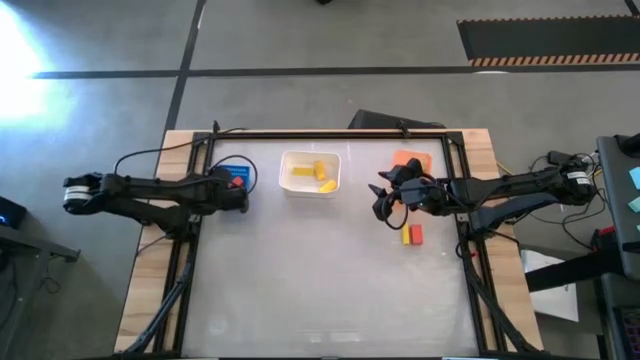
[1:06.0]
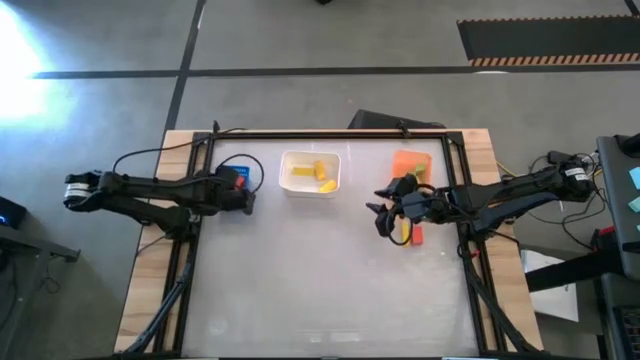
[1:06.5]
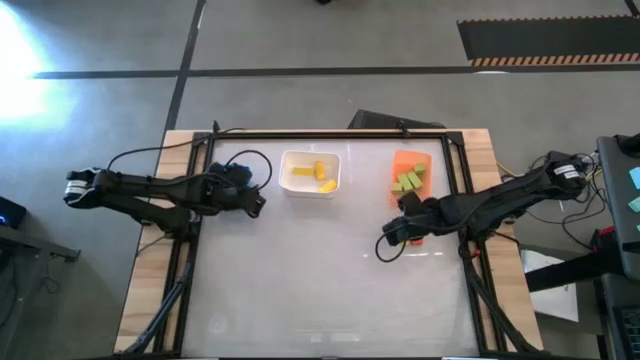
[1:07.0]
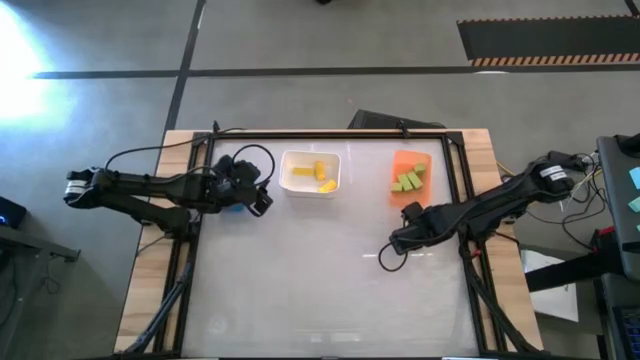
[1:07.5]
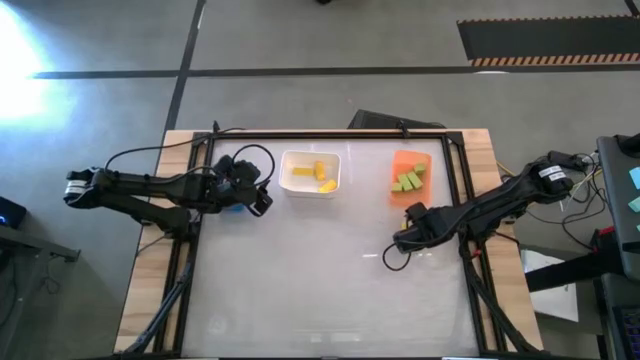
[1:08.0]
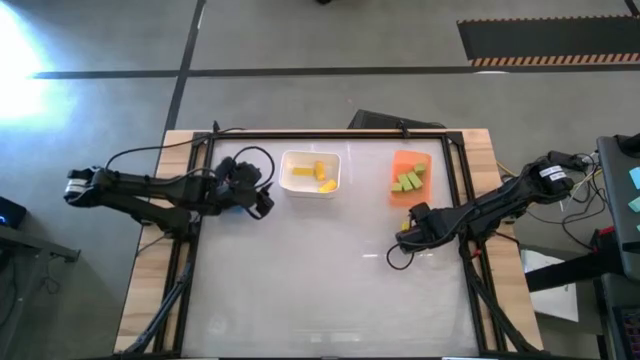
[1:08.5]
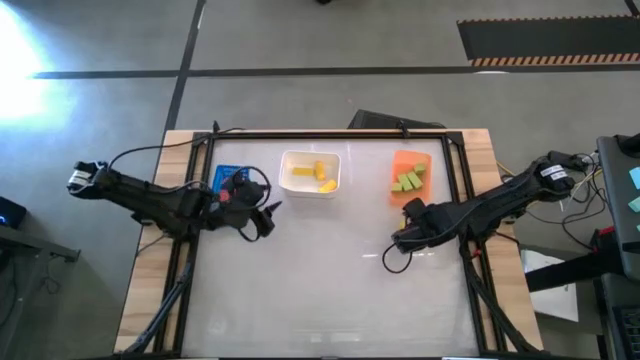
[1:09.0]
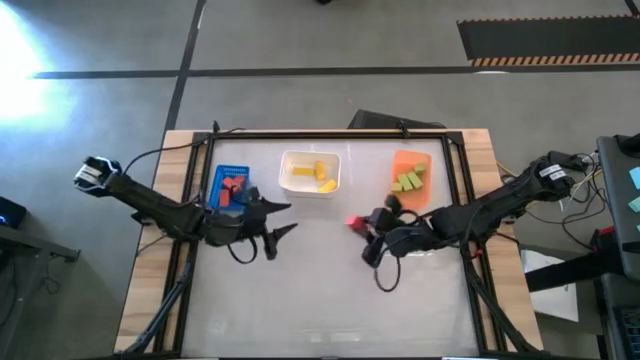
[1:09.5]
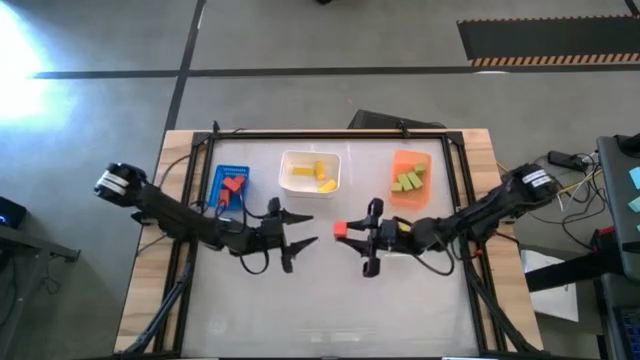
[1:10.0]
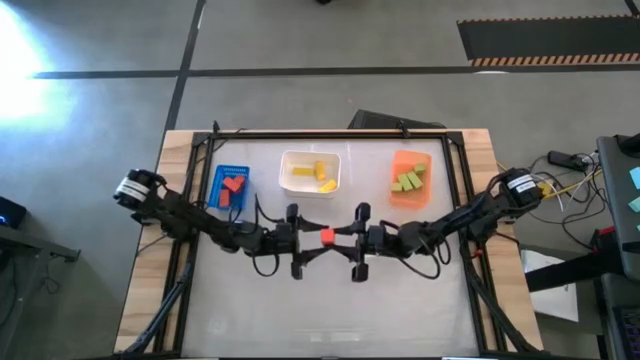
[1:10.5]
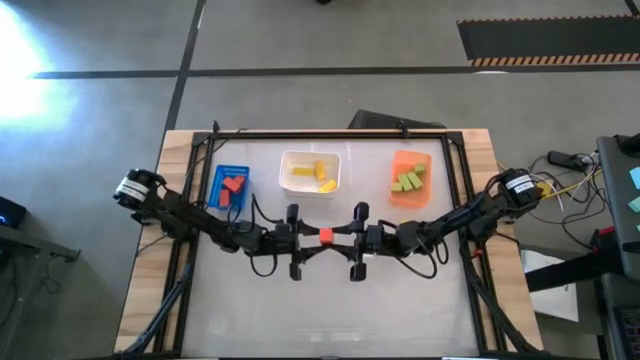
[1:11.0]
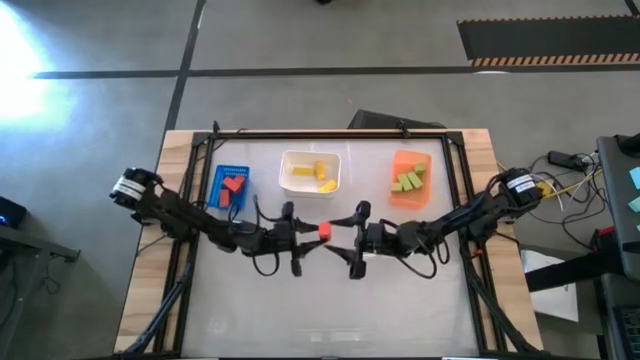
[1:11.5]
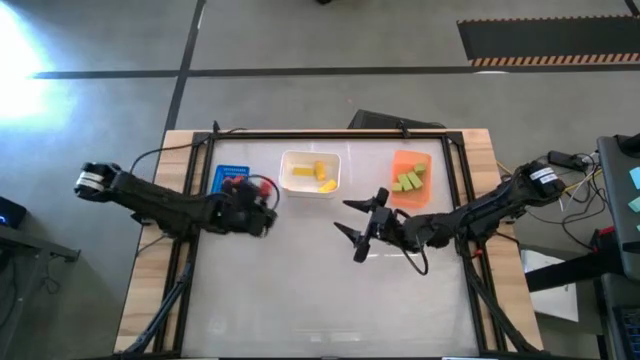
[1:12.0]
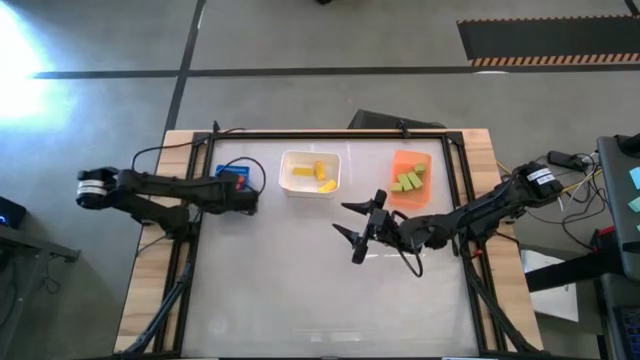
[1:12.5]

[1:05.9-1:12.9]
Task: Sort & place blocks by color
Put the orange block into the blue basket

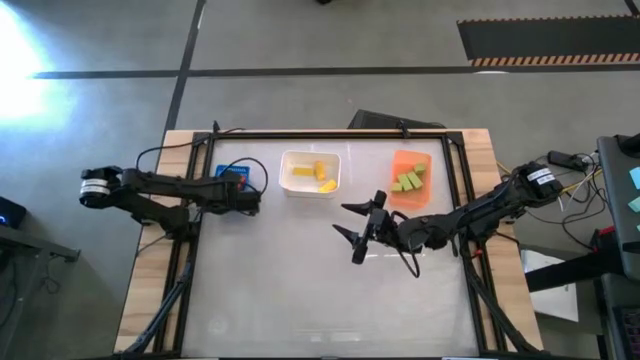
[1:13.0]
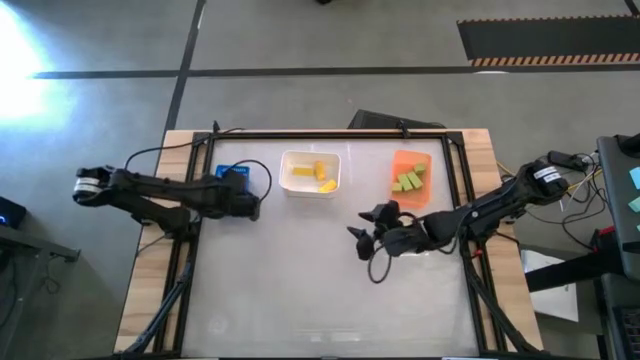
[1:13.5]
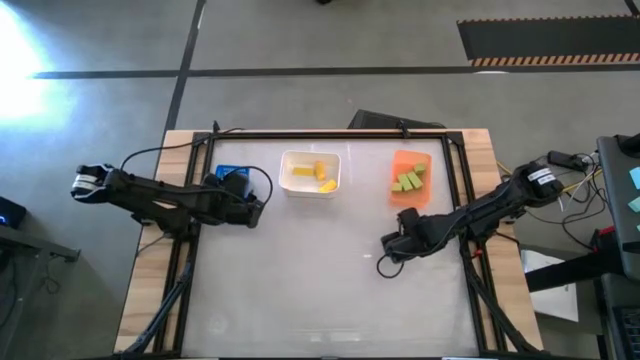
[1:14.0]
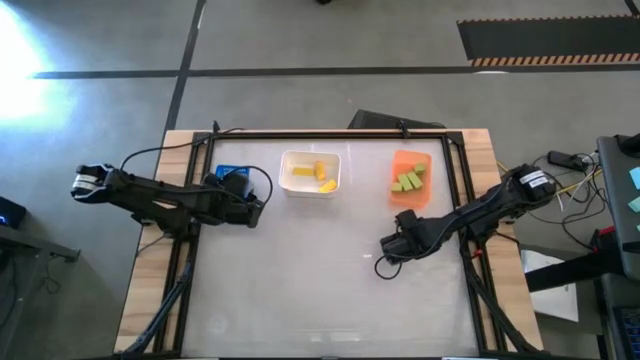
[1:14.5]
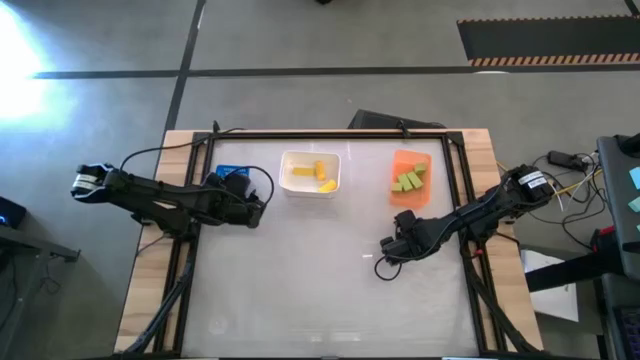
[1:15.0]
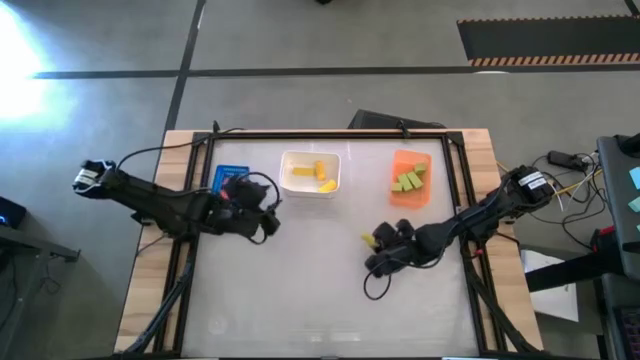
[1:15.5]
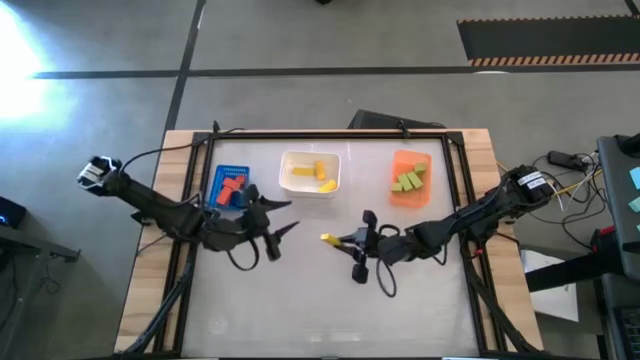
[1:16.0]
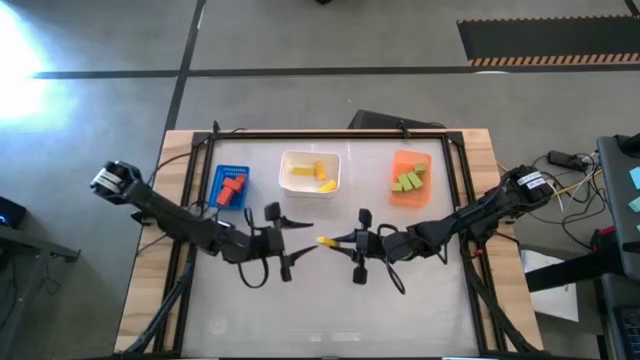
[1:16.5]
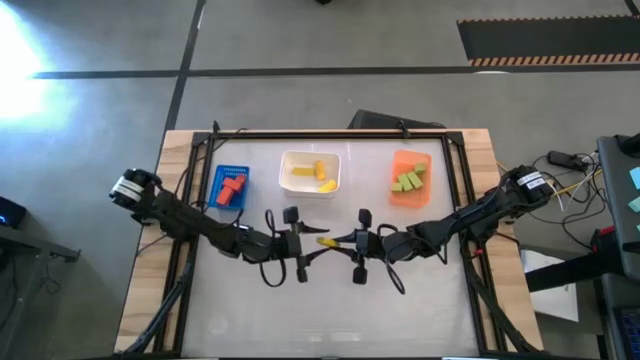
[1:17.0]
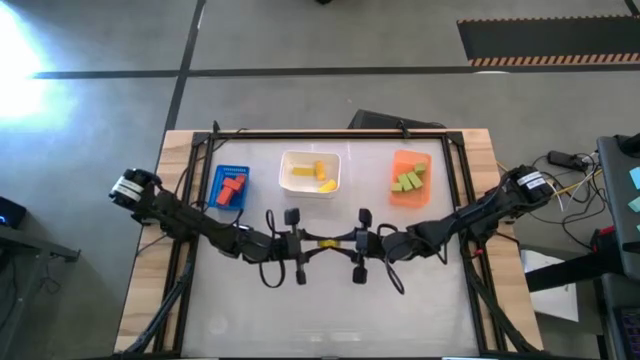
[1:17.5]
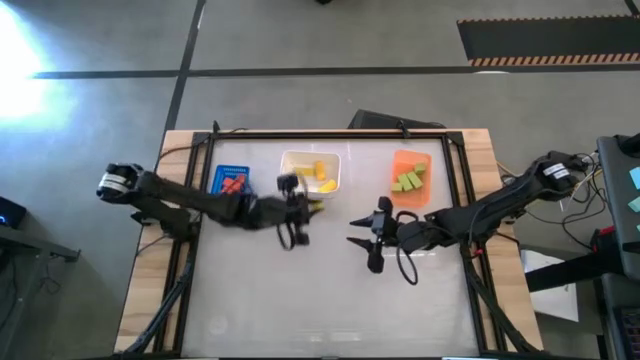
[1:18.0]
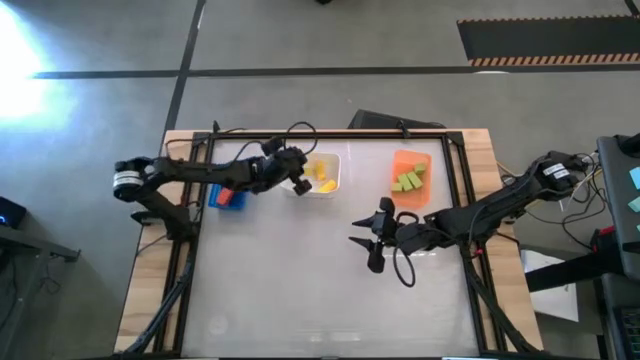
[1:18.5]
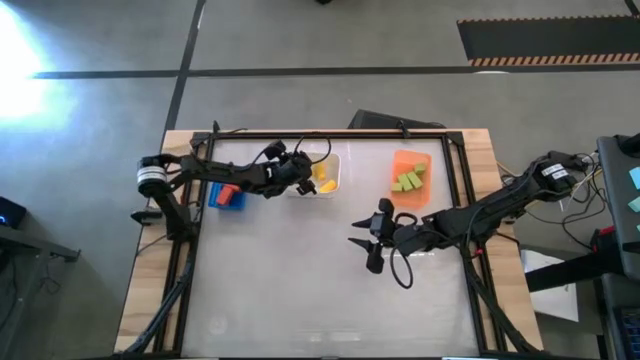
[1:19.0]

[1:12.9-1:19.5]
Put the yellow block into the white bin

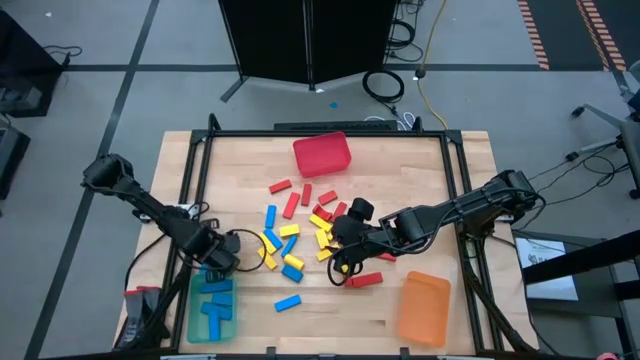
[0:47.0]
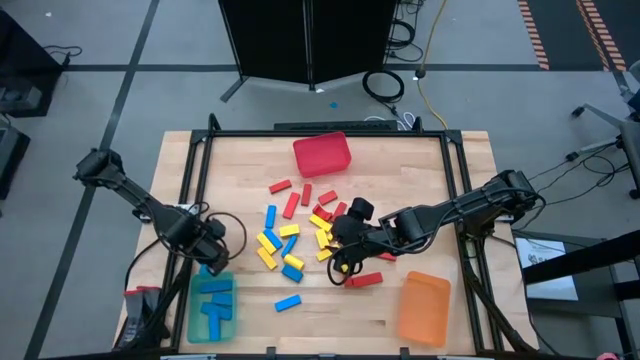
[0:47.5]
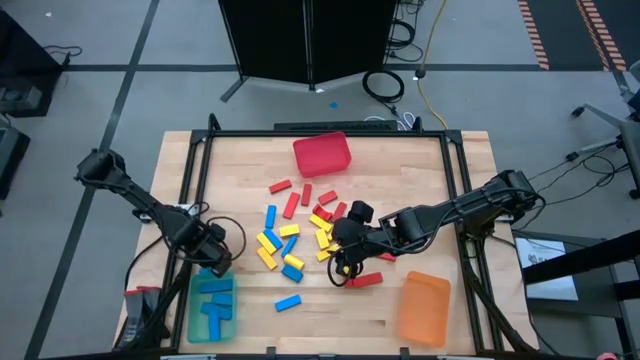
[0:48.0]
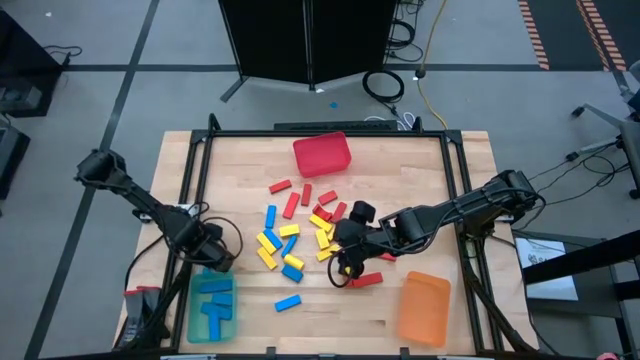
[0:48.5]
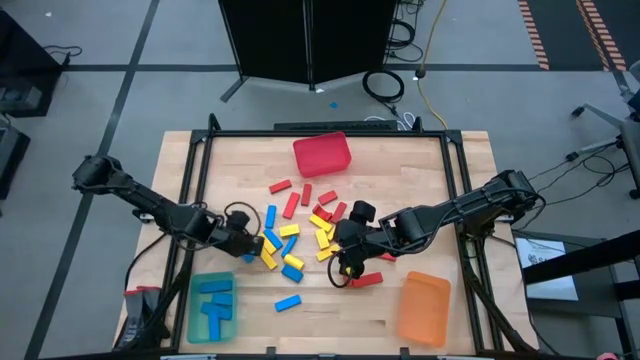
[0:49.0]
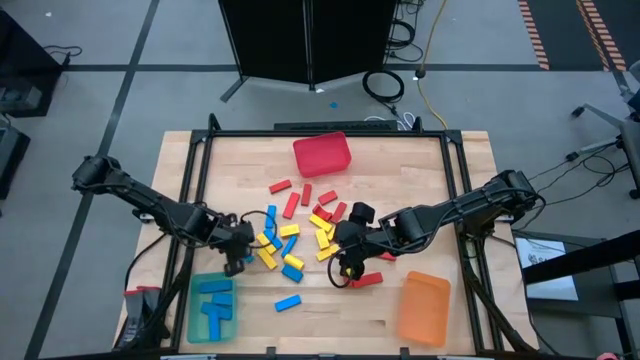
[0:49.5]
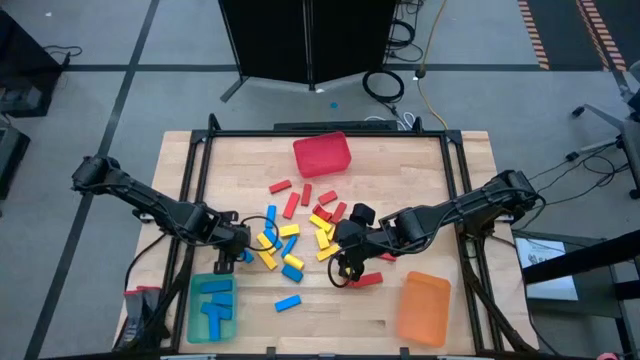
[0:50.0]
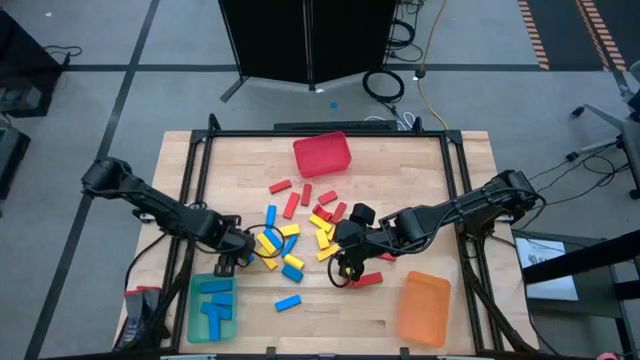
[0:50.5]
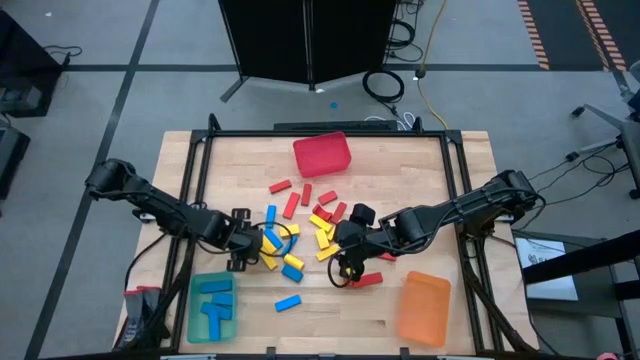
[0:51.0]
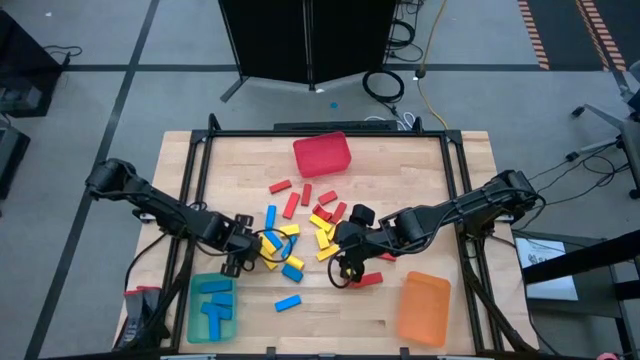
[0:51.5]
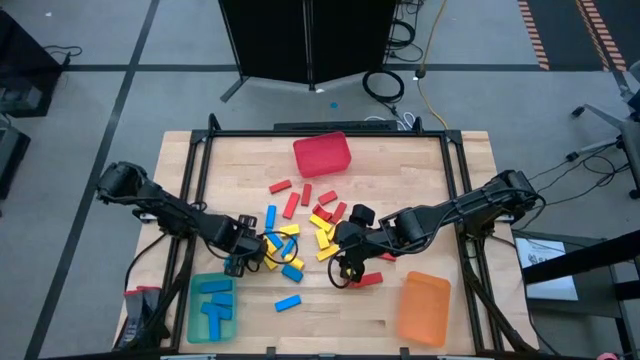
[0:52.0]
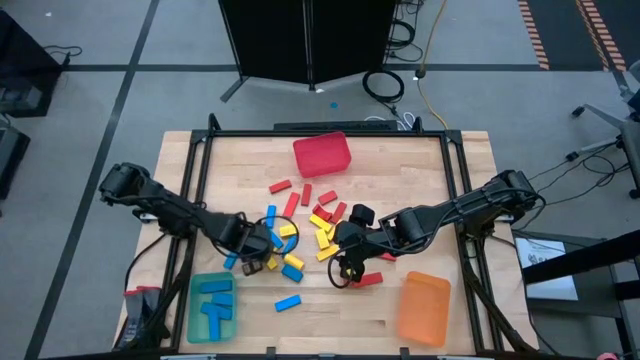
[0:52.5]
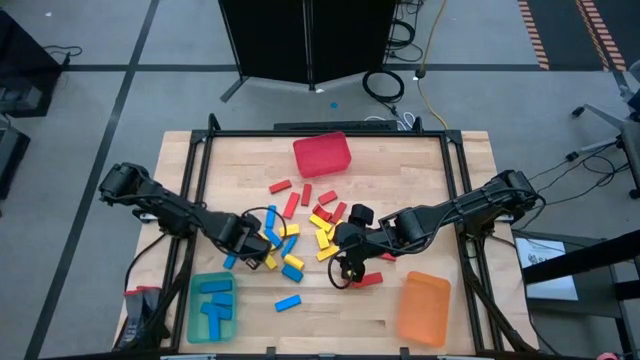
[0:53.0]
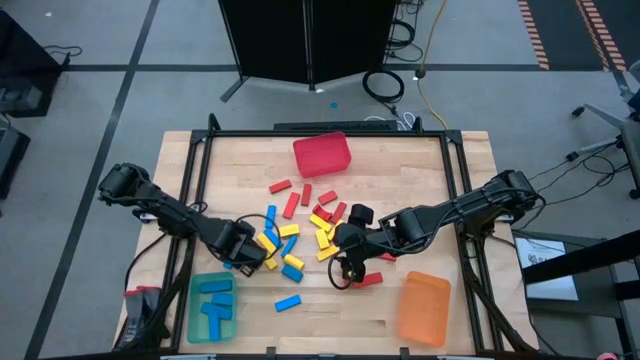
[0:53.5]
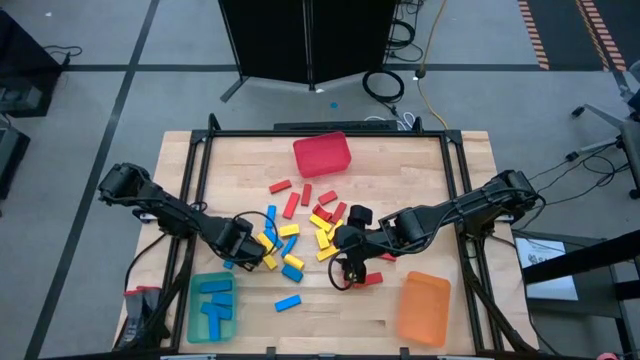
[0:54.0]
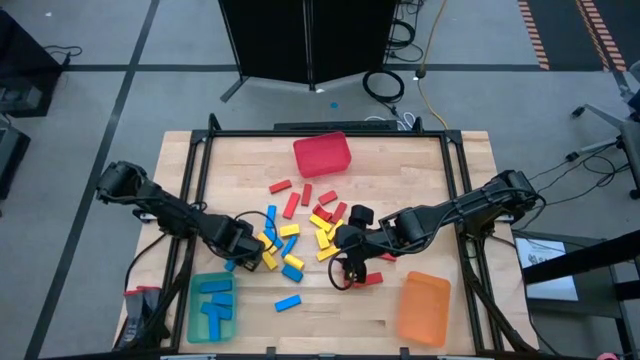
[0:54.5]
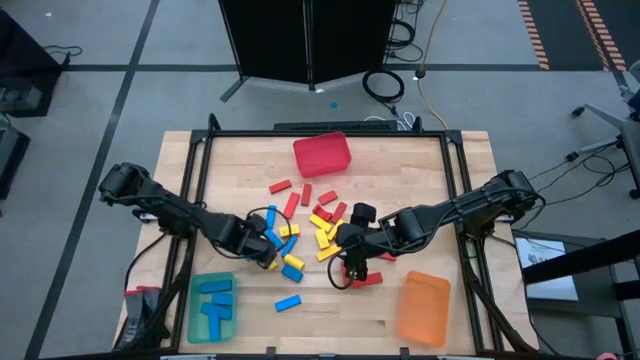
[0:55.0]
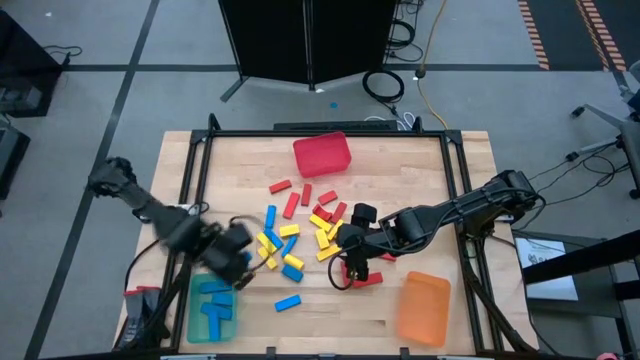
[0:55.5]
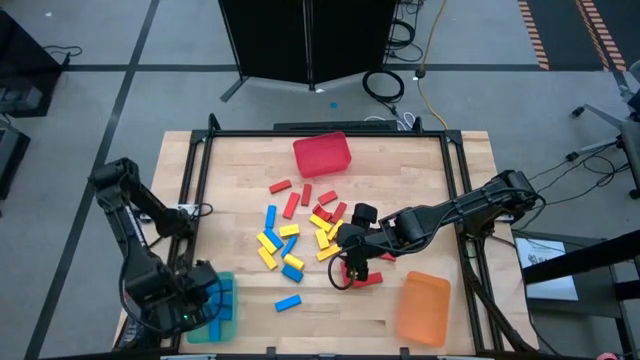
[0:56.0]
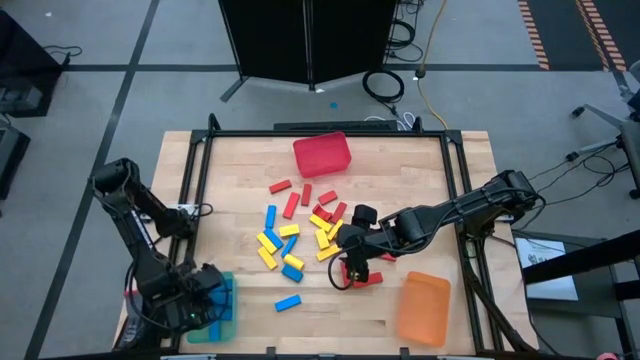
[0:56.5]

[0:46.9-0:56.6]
Task: Sort blocks
Put the blue block into the green bin
